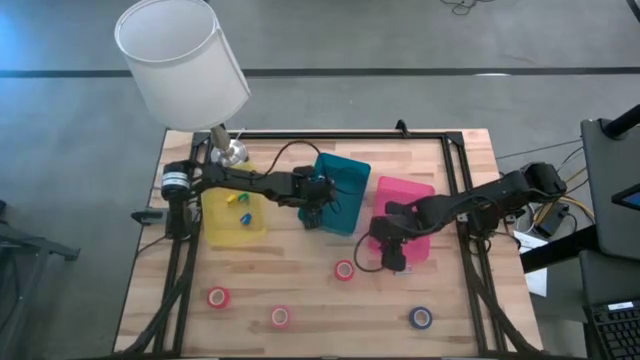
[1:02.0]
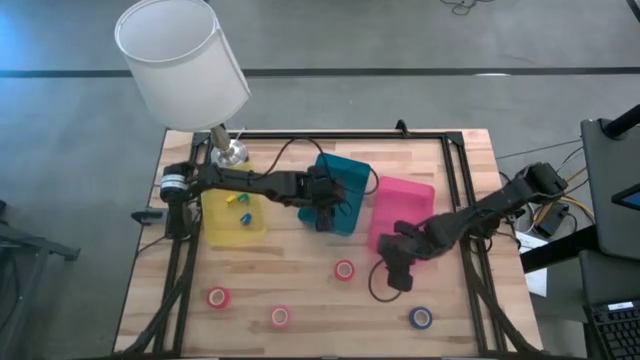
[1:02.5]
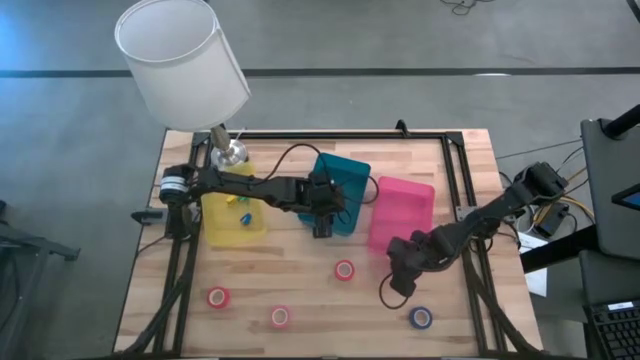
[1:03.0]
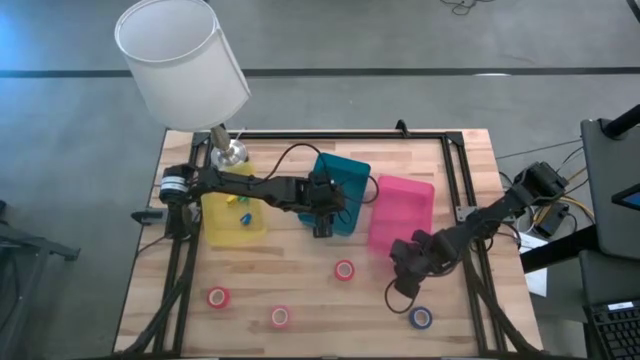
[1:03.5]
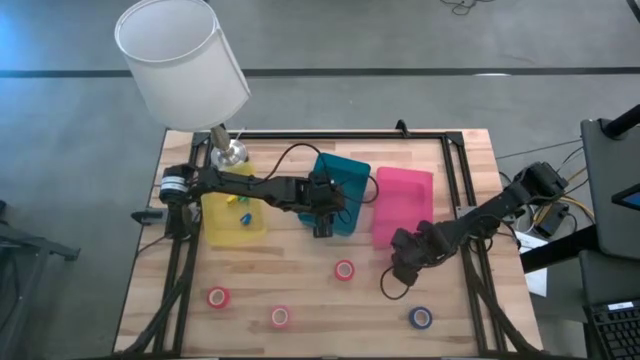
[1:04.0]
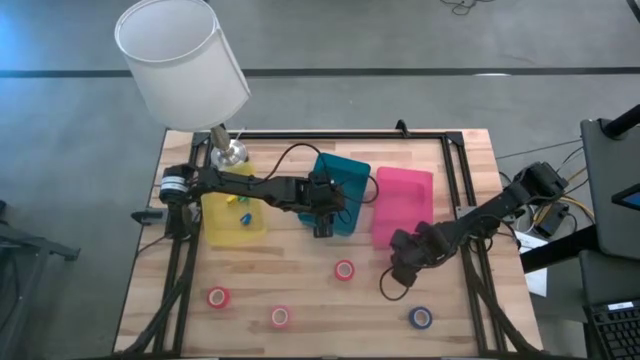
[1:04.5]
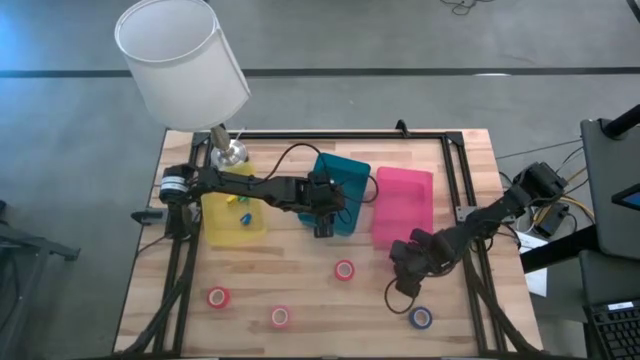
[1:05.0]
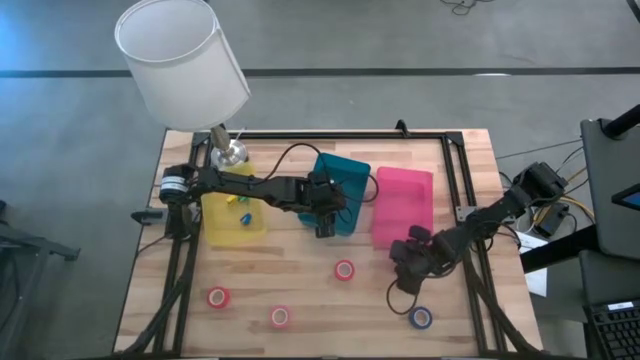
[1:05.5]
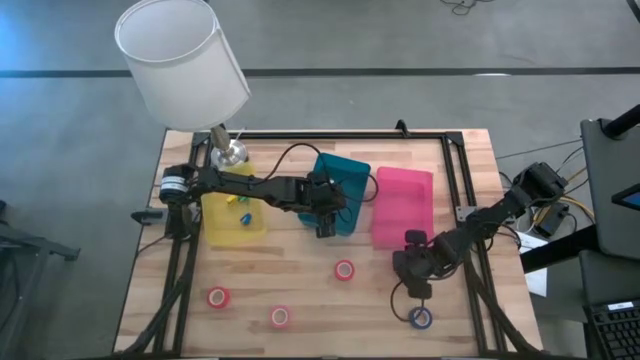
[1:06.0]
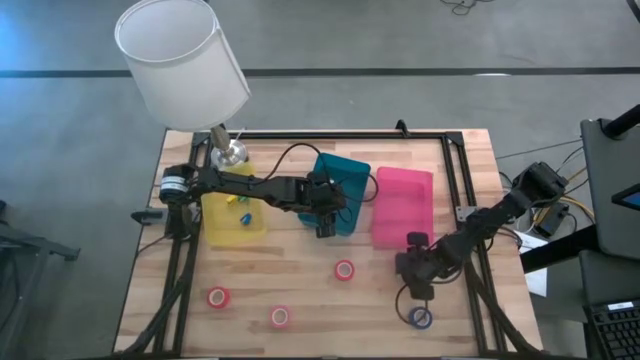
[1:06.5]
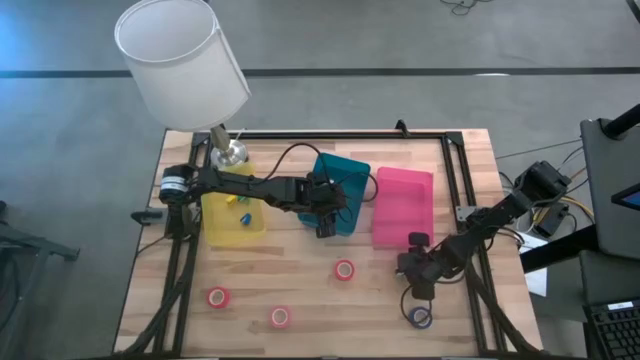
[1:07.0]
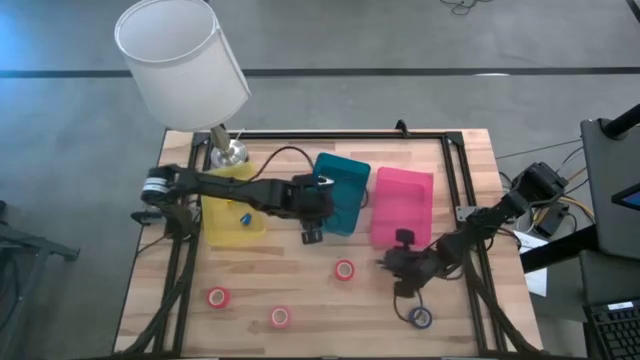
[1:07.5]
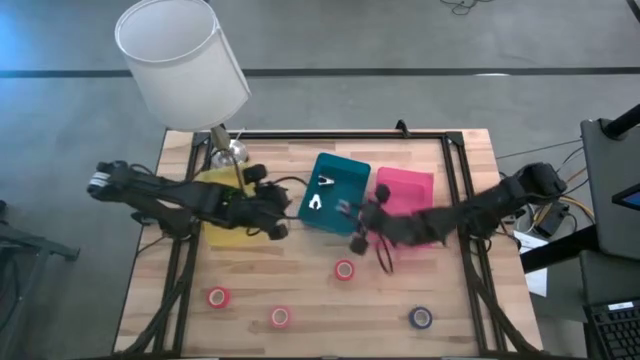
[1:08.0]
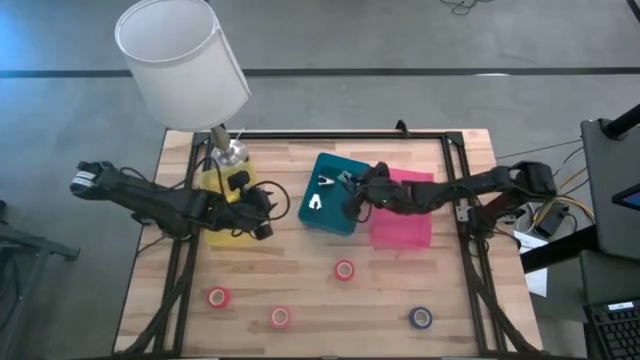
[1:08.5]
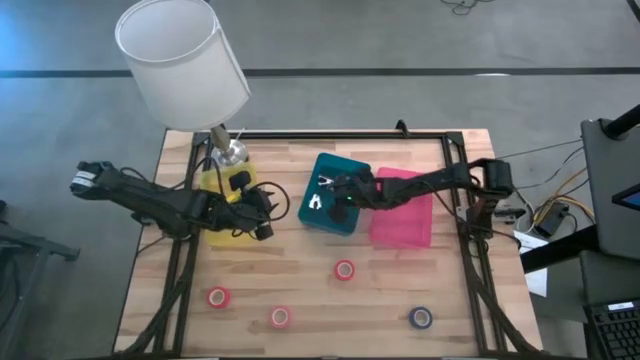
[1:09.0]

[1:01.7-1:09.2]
Task: Pick and place Stapler, Stapler remover, tape
Put the blue staple remover into the blue bin

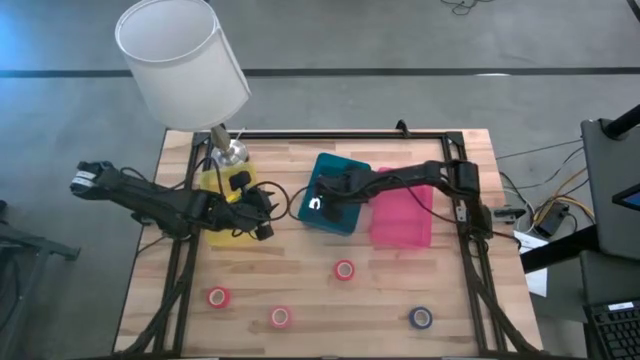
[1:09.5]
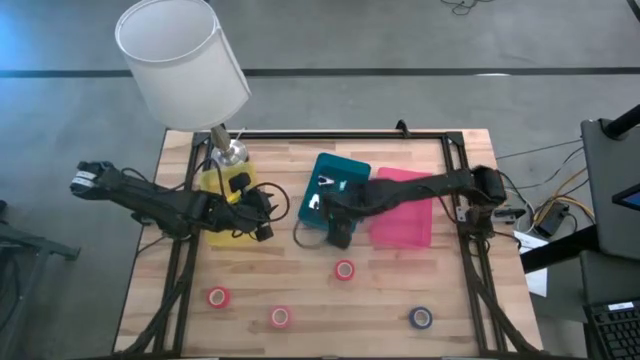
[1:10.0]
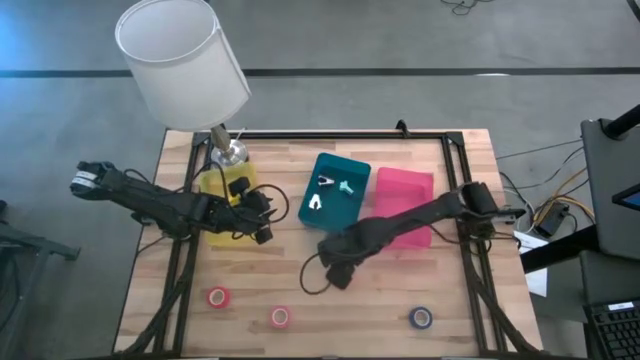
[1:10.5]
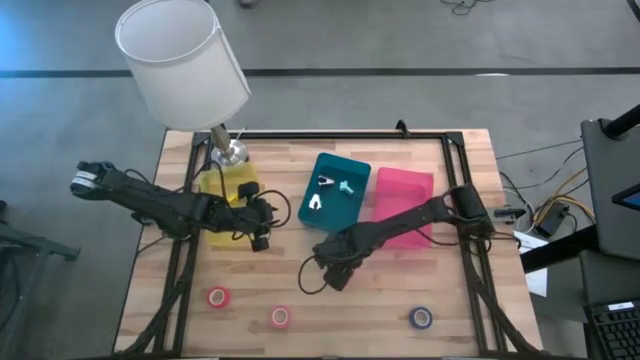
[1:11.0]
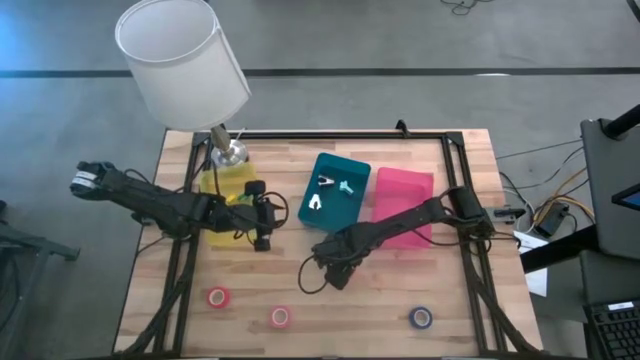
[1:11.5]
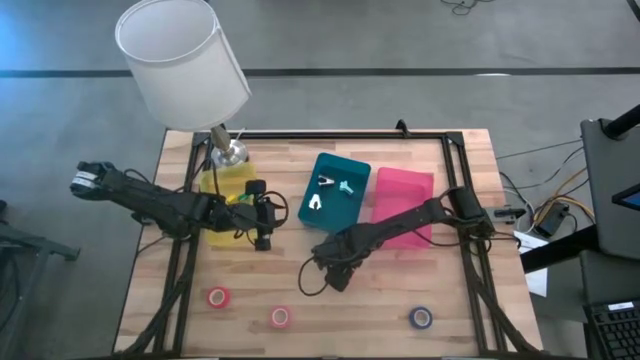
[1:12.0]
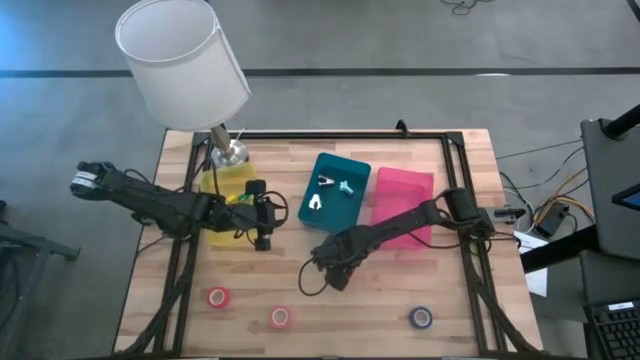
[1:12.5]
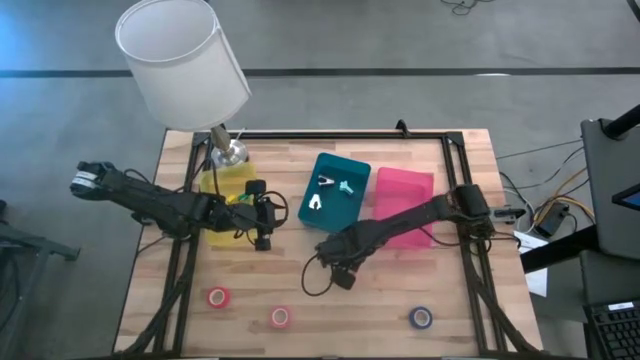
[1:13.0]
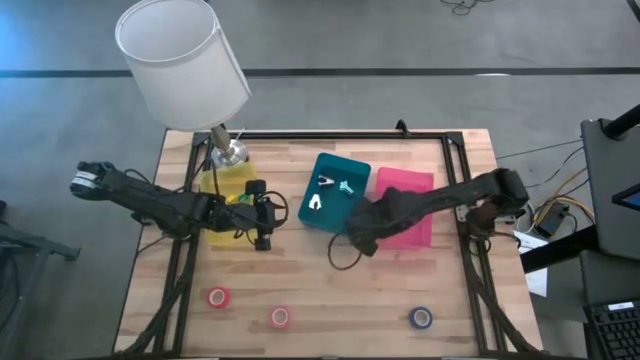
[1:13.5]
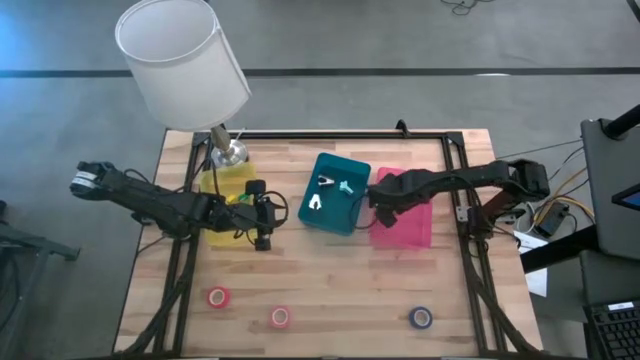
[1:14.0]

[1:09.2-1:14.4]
Put the right orange tape into the pink bin

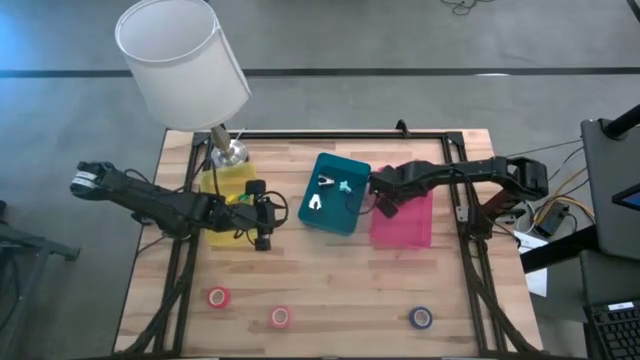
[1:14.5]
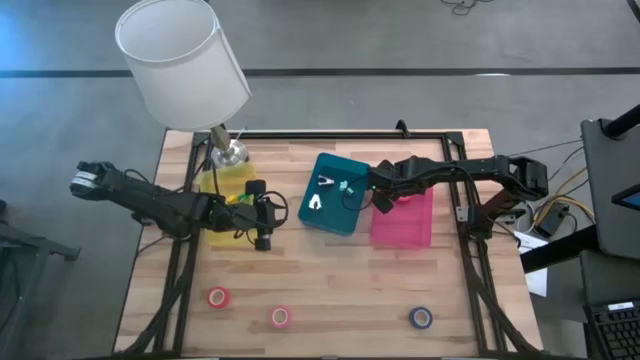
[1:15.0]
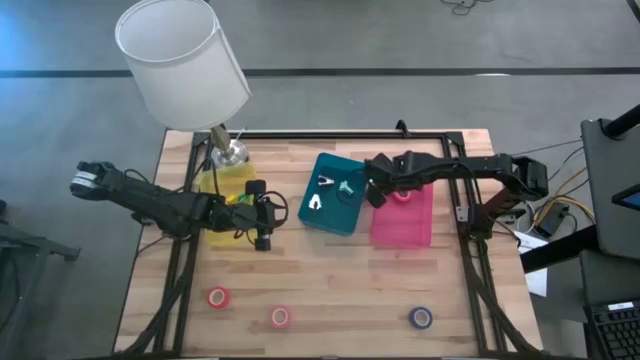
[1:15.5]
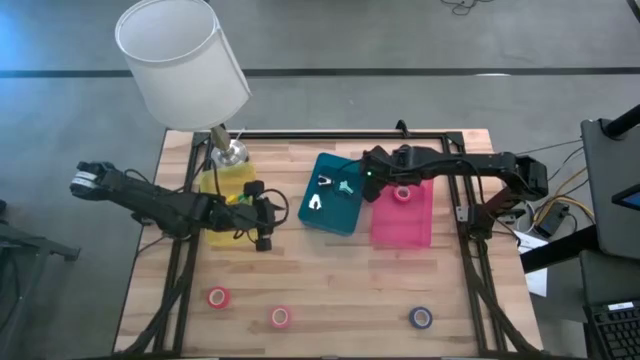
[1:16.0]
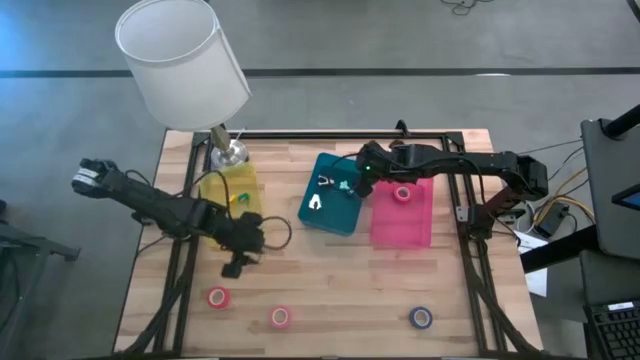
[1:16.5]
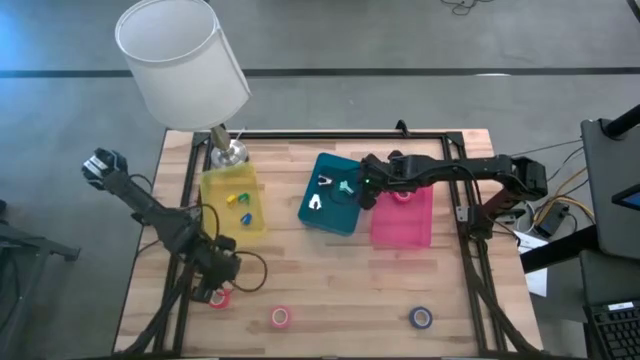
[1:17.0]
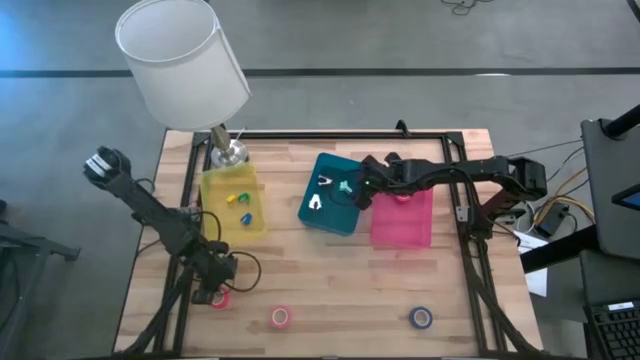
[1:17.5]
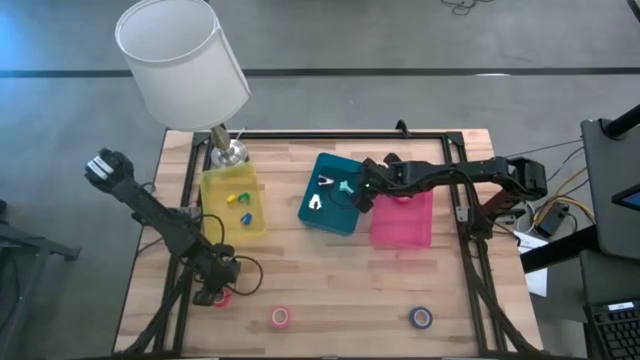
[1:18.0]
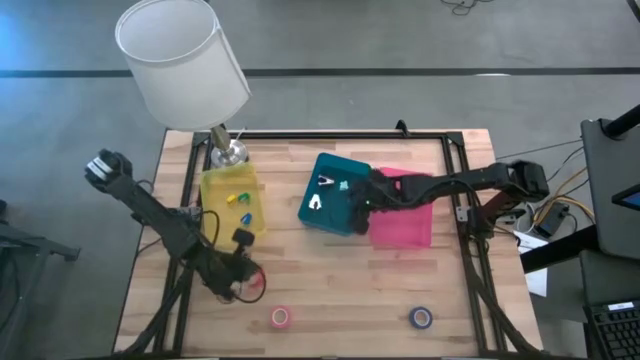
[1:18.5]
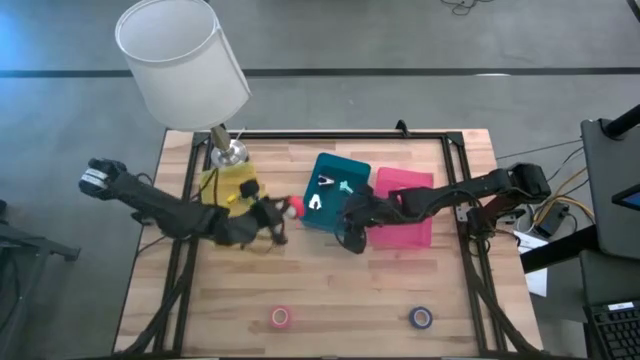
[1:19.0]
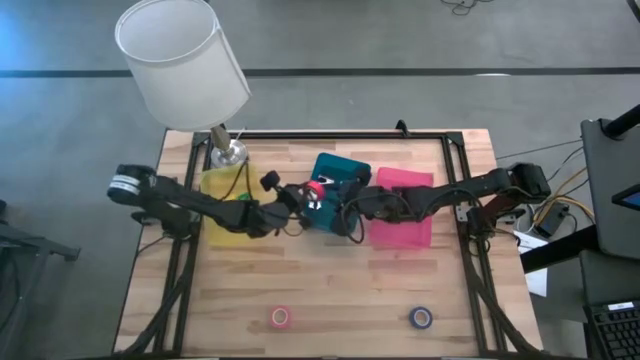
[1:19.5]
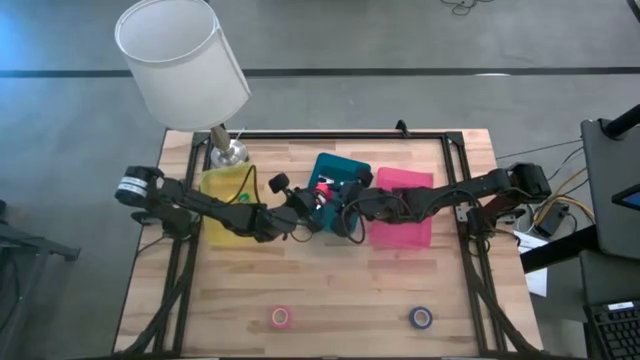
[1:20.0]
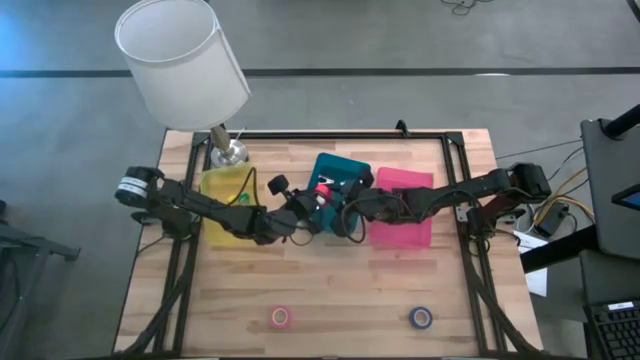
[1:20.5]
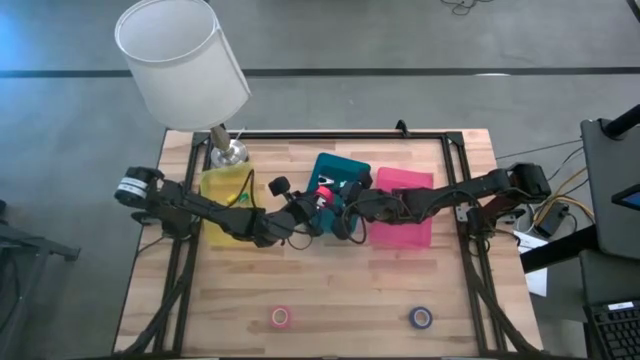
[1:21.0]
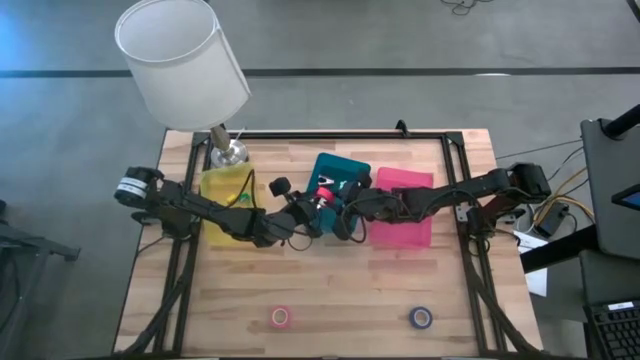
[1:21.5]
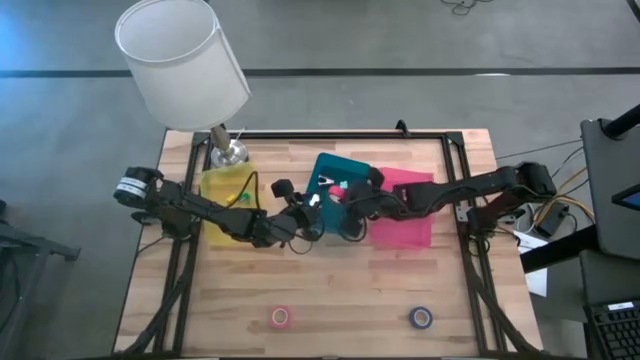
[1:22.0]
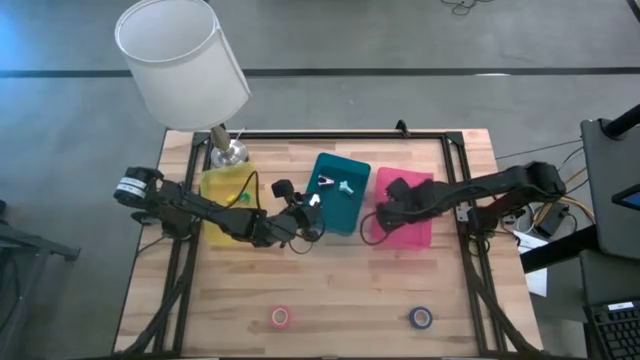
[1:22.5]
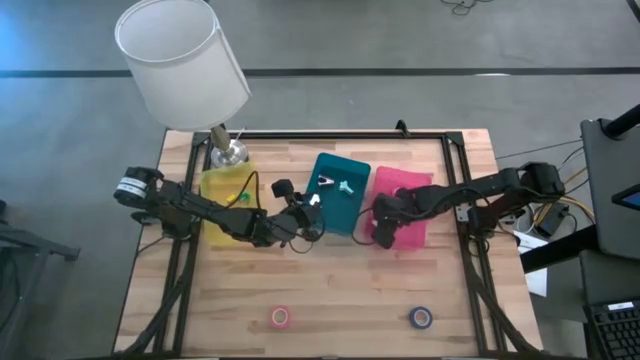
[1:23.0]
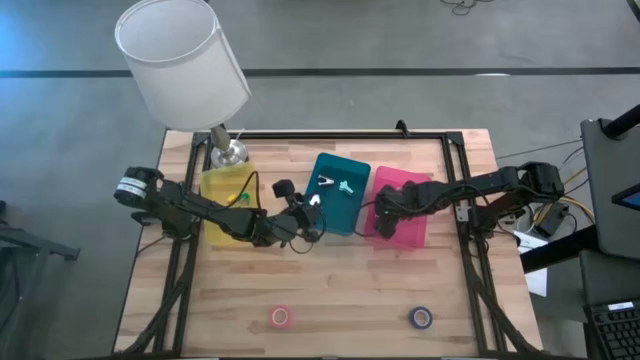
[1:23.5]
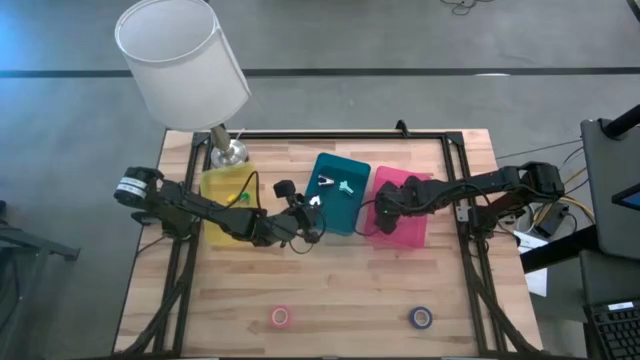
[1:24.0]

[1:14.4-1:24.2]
Put the orange tape into the pink bin
